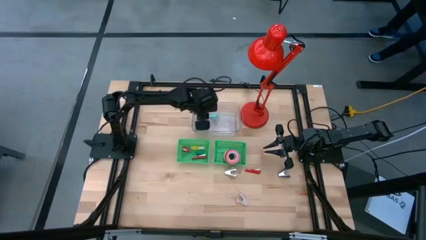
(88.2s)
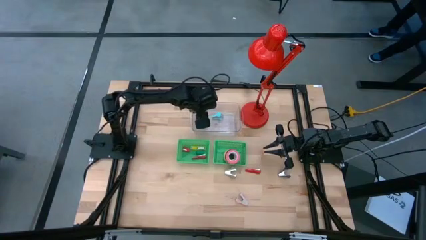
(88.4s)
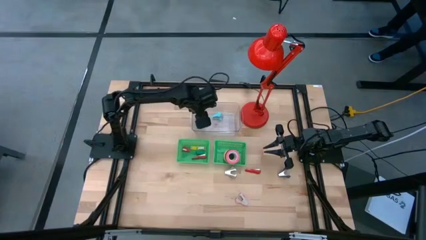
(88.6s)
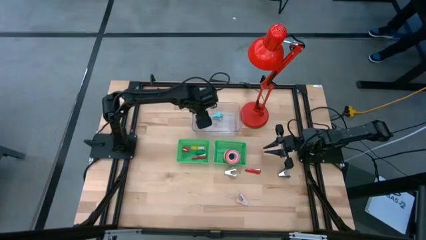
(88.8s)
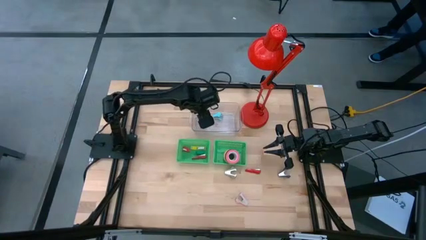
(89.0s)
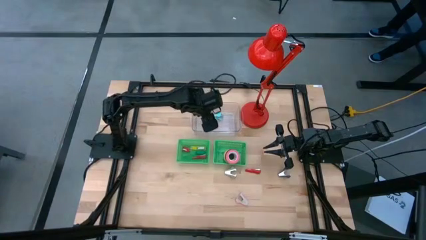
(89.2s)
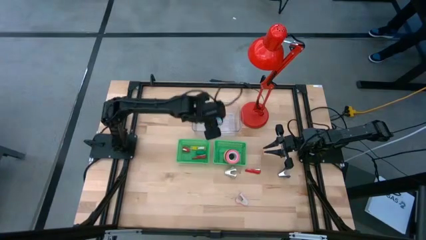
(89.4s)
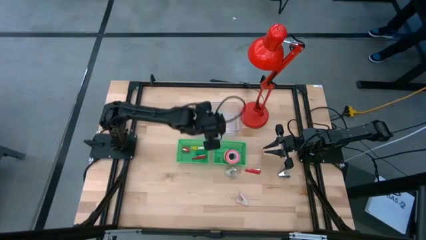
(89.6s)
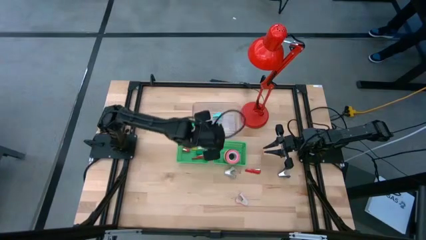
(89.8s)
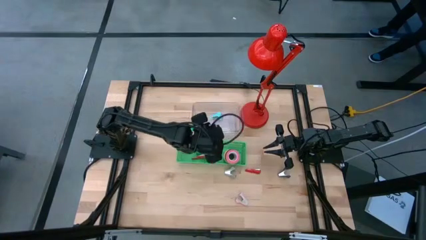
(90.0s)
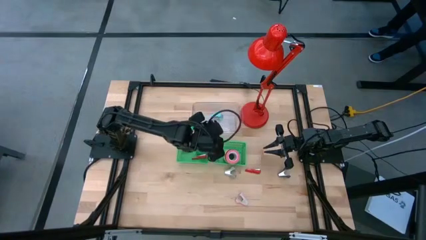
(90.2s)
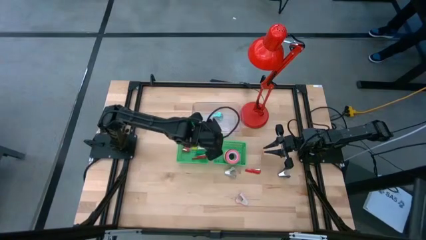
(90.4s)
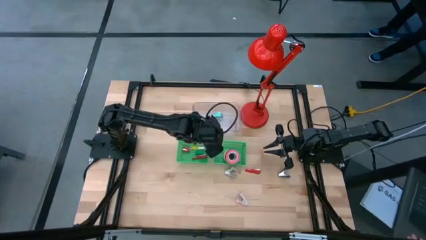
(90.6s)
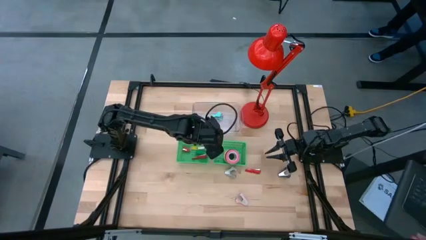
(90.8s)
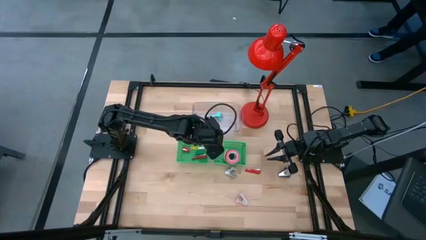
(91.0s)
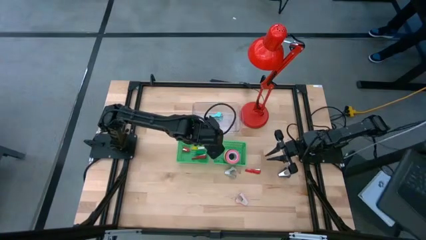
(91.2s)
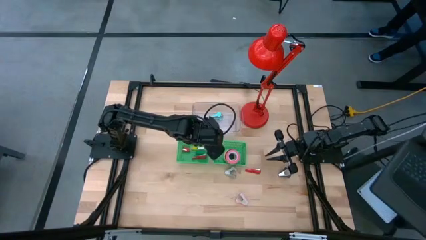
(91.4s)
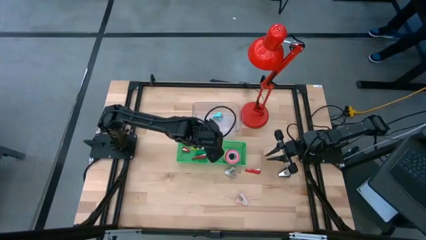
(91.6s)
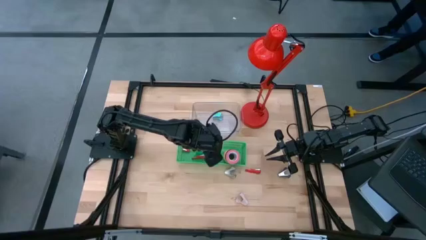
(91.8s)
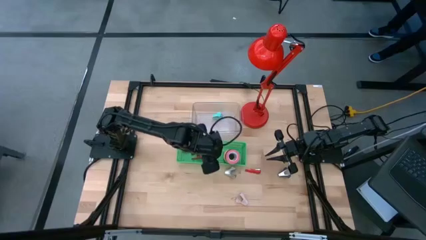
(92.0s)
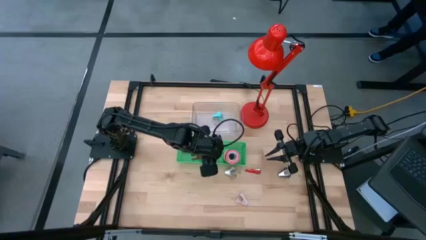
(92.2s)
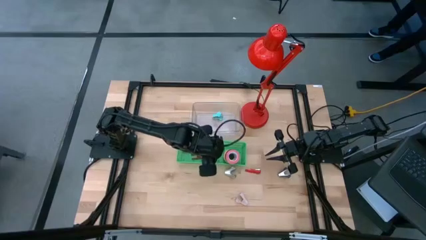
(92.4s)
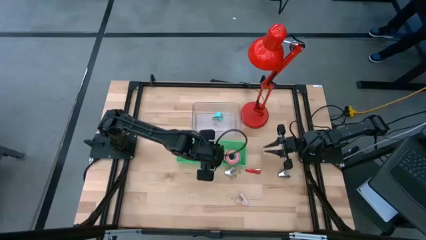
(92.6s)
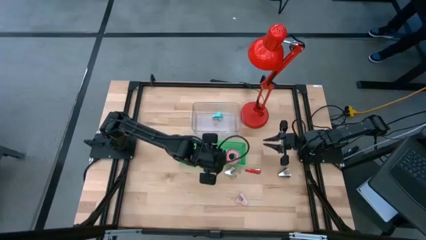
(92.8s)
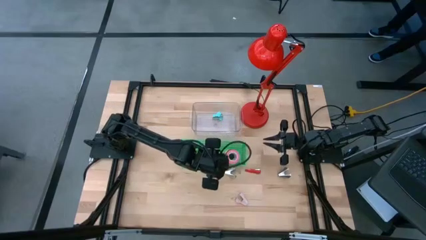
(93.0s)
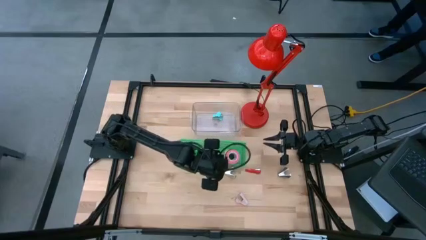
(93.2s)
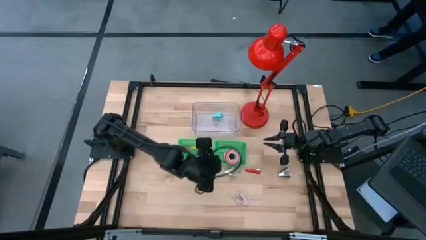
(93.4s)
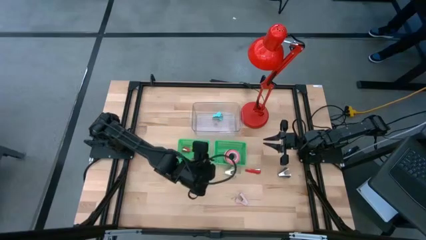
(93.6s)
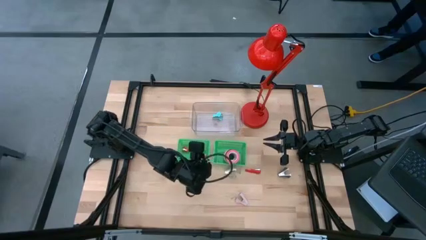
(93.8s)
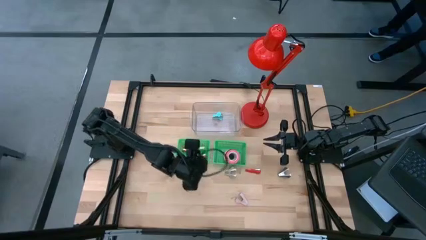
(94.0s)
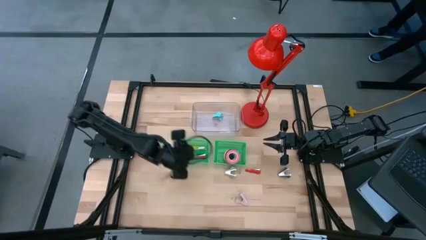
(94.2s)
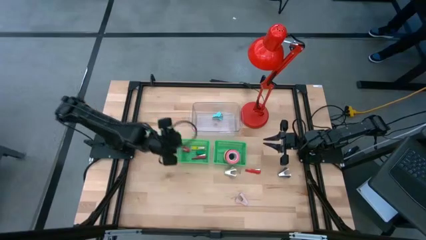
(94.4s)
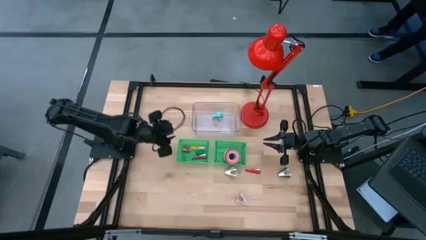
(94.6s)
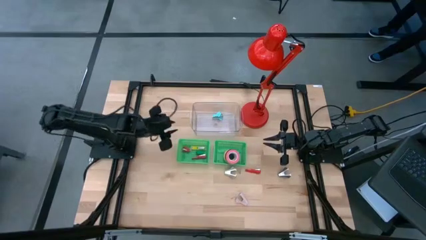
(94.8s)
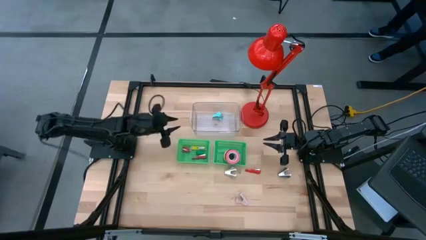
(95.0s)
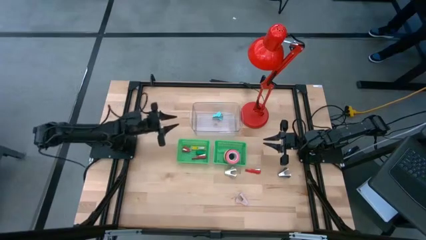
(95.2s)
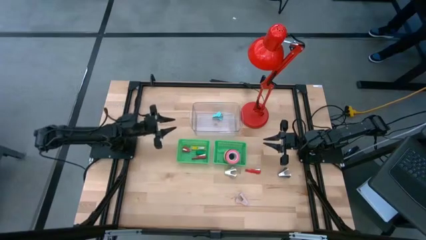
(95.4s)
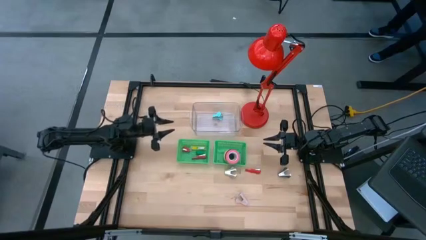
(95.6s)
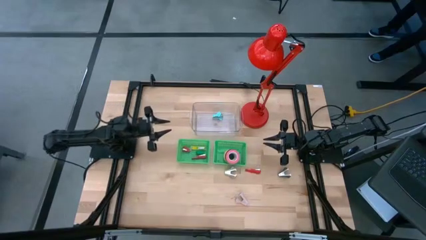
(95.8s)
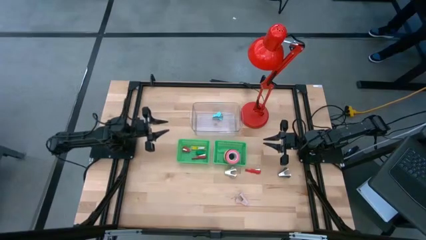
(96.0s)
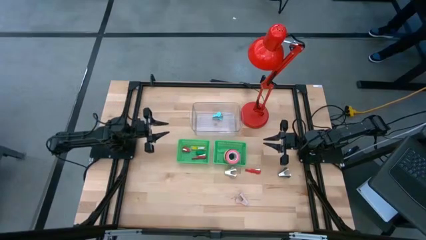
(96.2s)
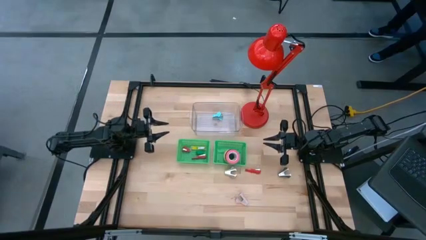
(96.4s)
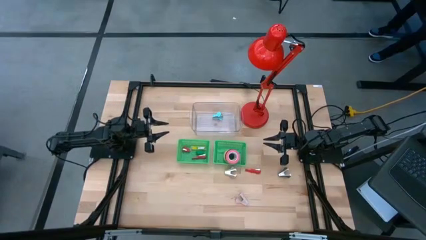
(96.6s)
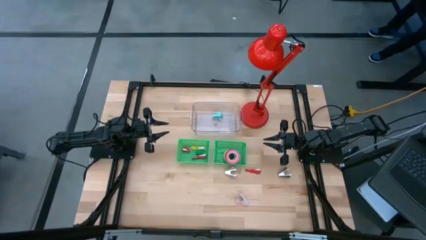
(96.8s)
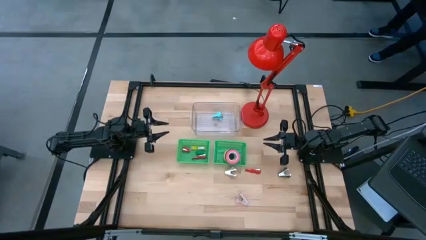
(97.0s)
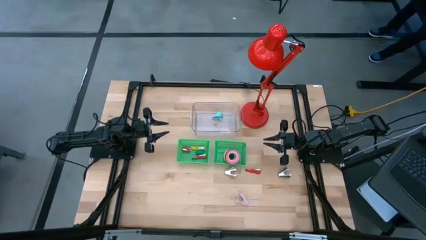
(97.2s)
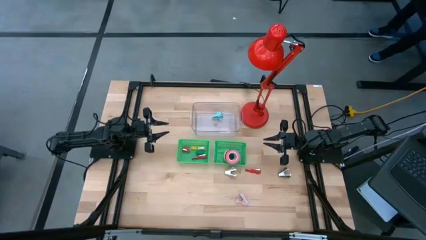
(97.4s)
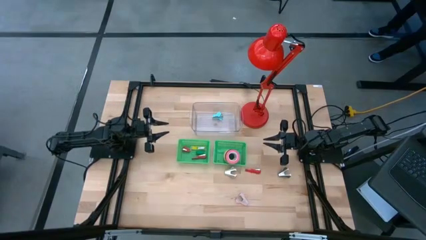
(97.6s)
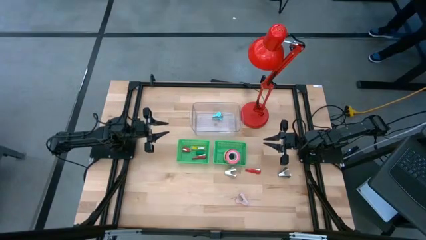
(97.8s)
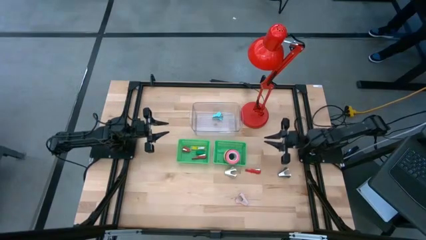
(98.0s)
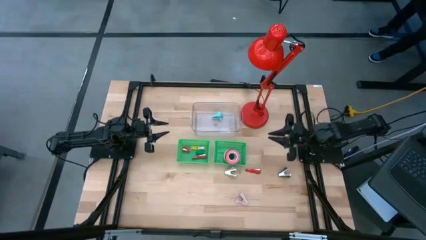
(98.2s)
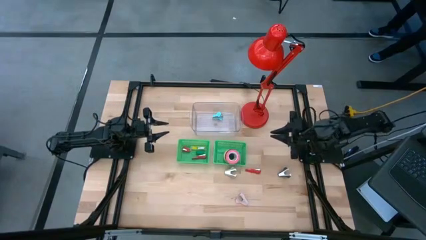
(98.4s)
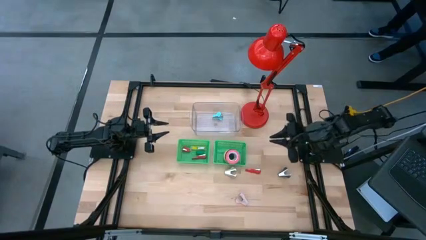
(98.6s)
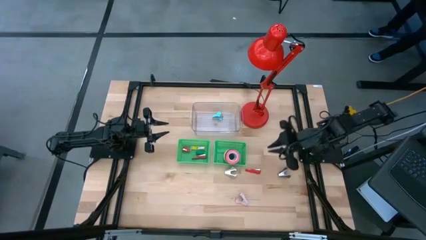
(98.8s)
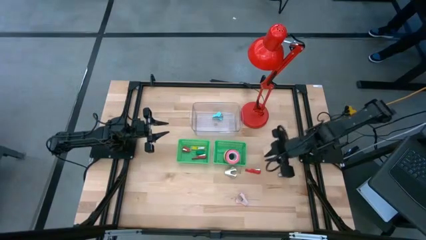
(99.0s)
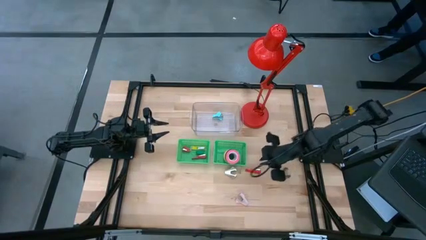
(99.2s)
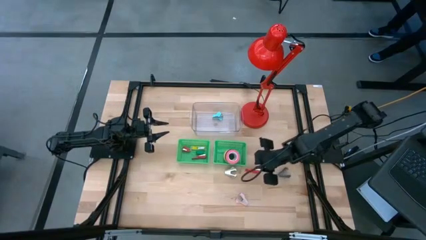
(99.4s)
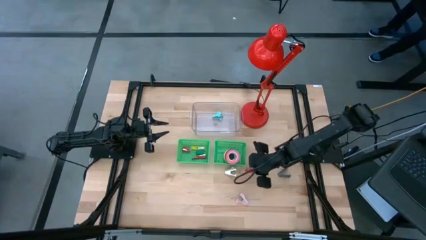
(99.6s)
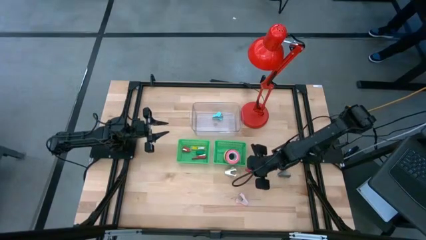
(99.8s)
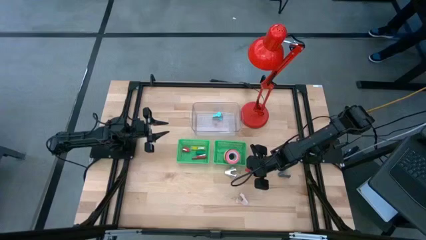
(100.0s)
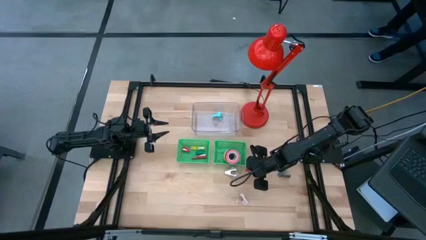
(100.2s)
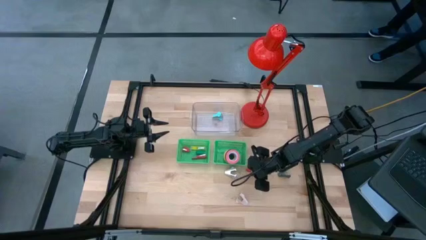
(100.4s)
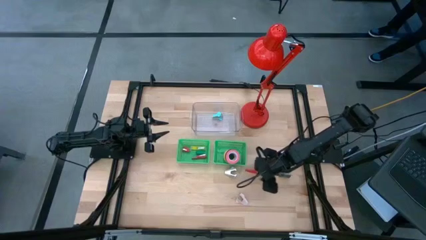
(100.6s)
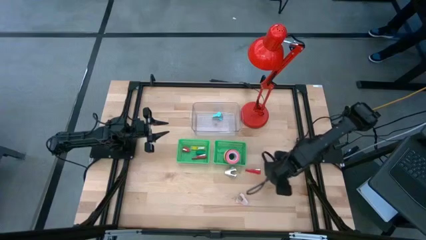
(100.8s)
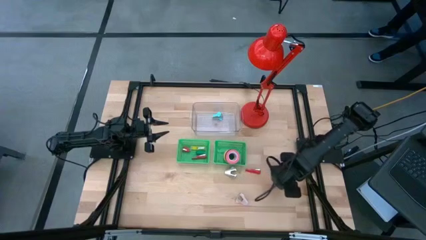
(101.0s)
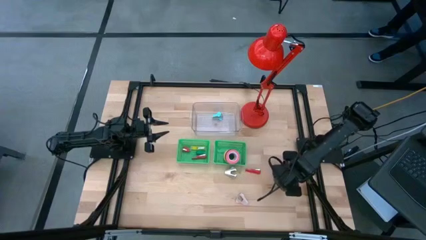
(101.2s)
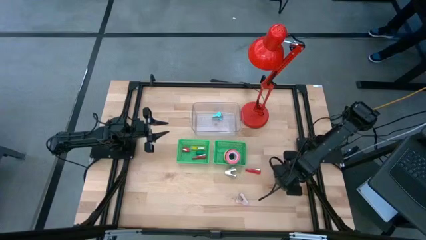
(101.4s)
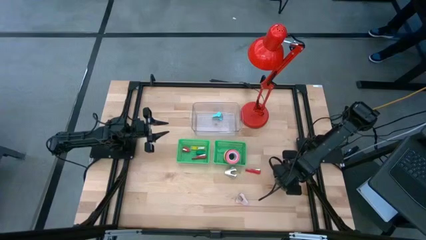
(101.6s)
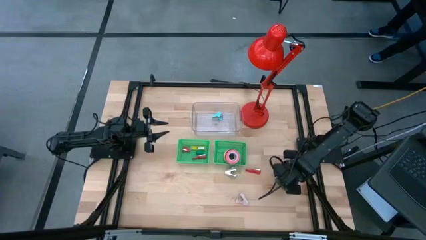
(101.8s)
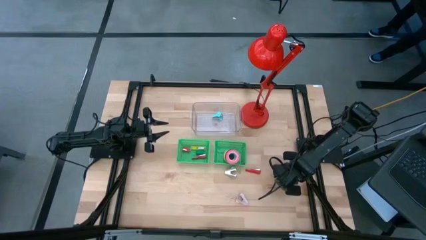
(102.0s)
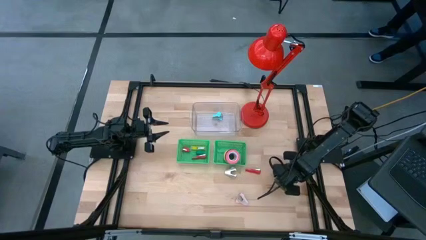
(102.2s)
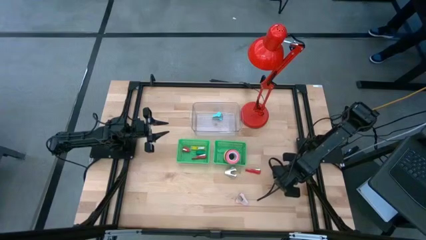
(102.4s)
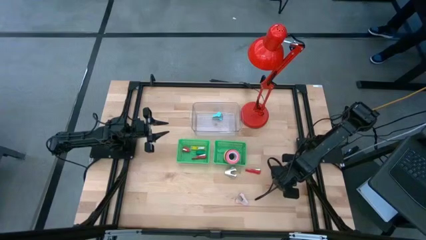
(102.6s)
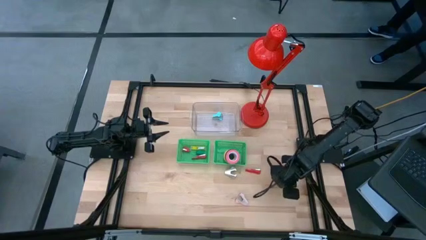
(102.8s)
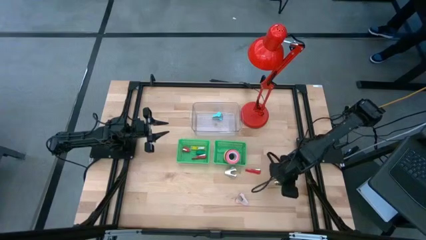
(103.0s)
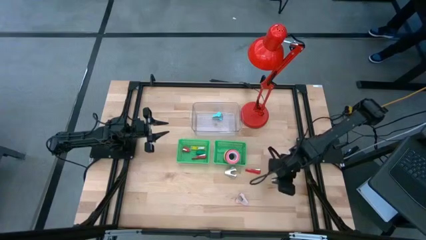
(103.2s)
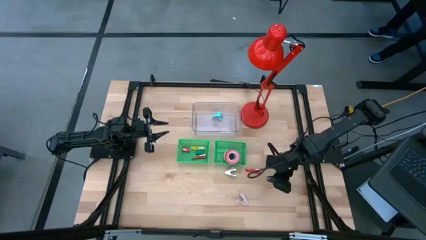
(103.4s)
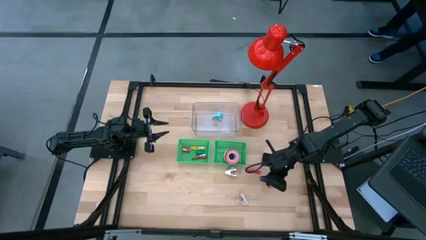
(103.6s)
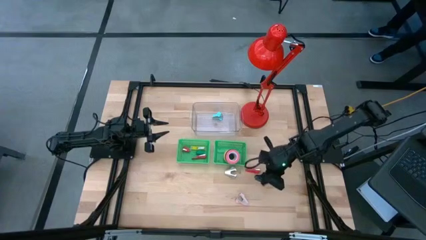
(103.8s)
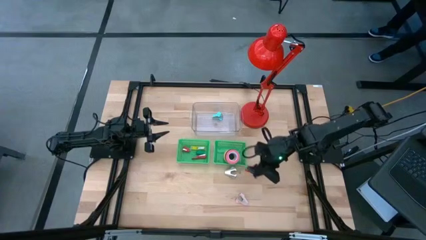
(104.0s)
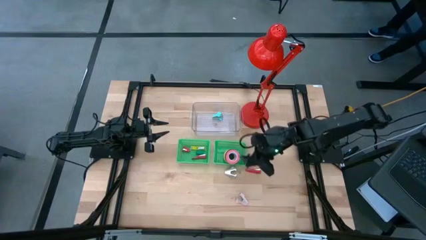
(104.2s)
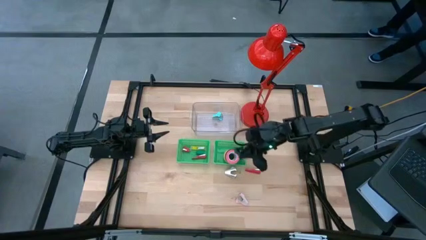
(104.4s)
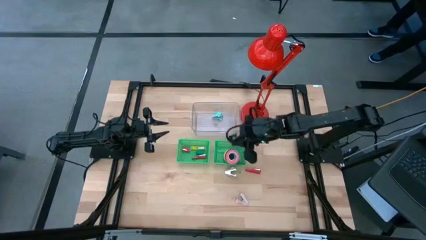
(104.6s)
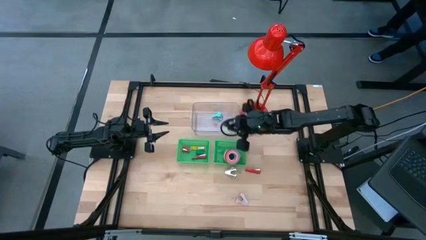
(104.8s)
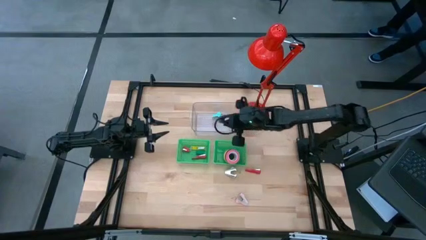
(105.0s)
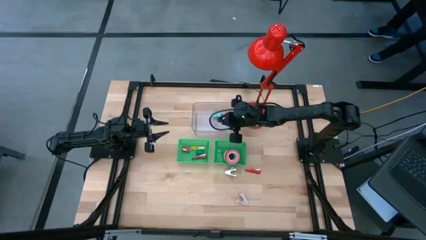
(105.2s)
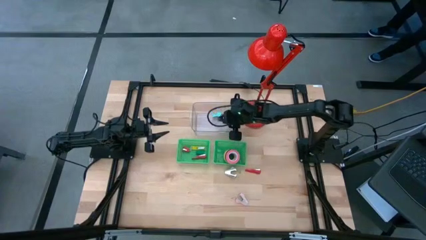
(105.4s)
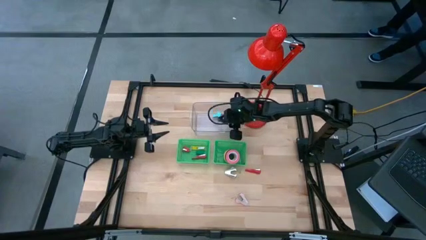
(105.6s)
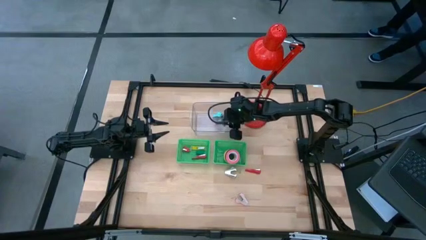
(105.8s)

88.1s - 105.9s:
Task: Pick and place Stapler, Stapler remover, tape
Put the black staple remover into the transparent bin
